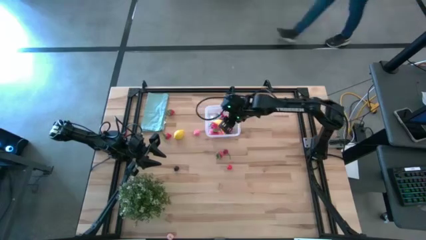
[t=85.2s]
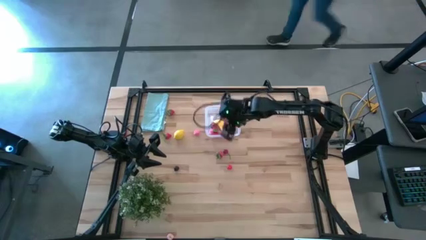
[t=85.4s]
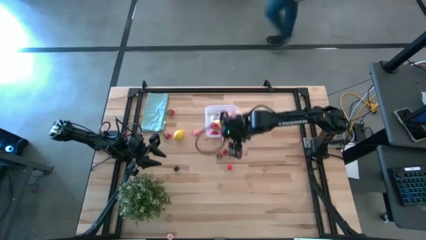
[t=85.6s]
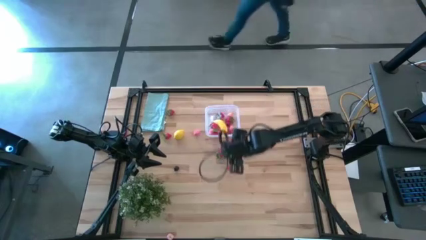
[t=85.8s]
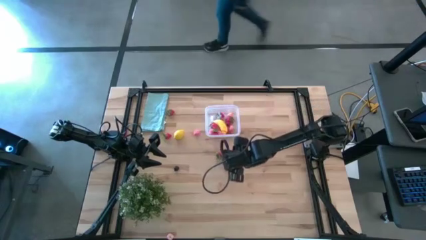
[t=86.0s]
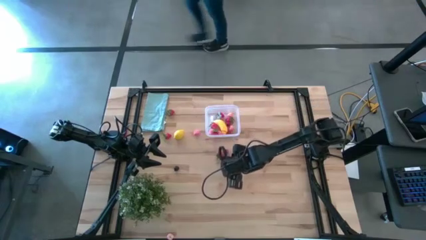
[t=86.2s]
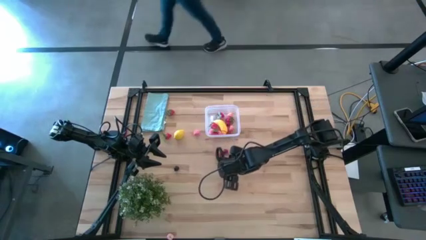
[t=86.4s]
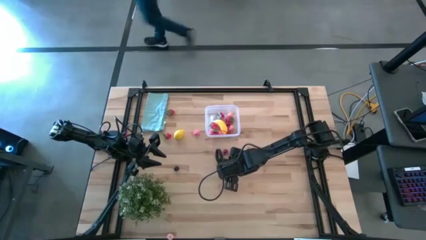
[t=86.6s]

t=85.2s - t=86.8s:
Task: Pick and placing Produce into tupperware
Put the red cherry into the transparent bin

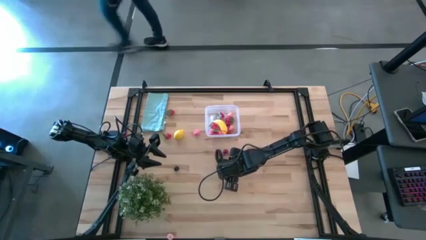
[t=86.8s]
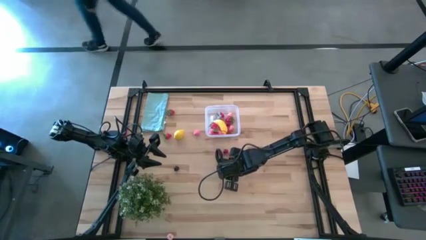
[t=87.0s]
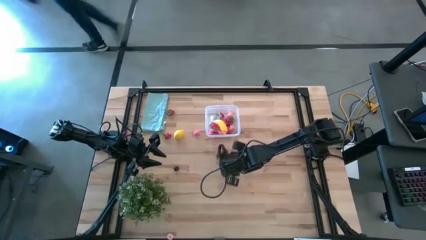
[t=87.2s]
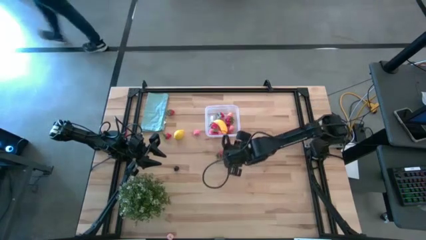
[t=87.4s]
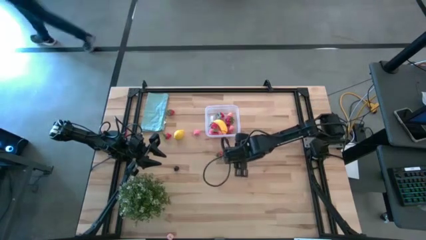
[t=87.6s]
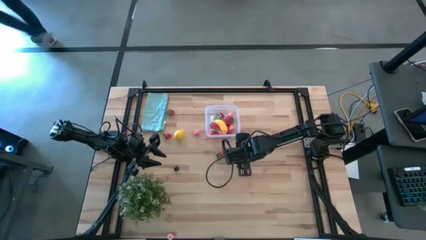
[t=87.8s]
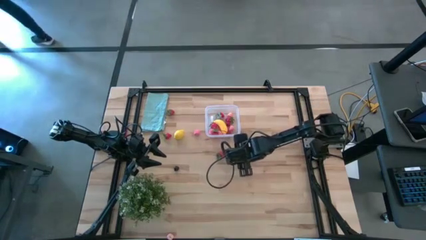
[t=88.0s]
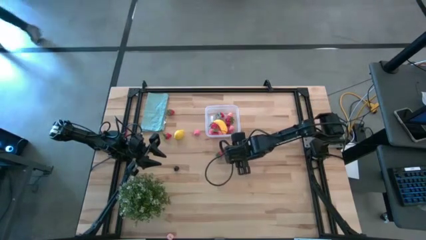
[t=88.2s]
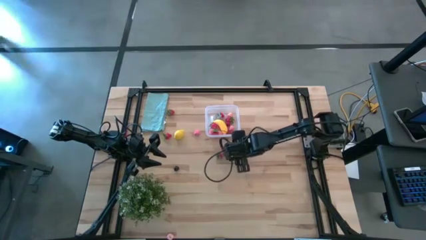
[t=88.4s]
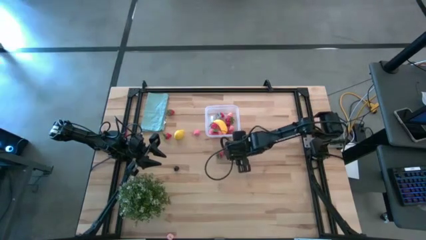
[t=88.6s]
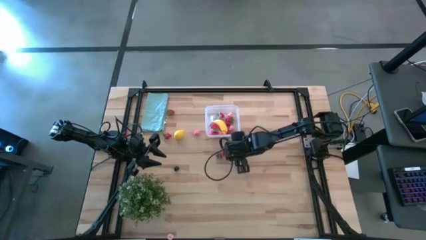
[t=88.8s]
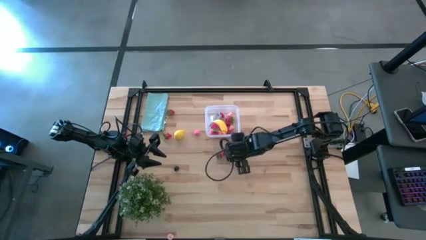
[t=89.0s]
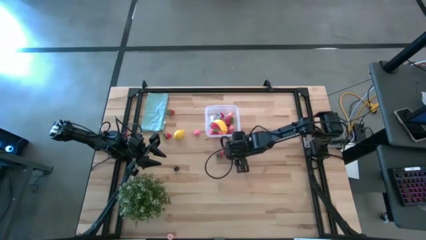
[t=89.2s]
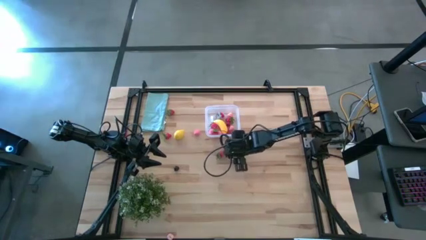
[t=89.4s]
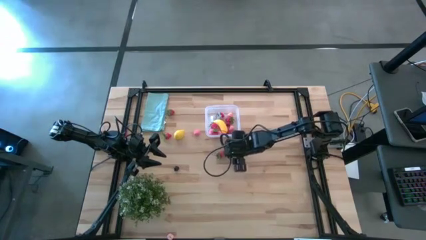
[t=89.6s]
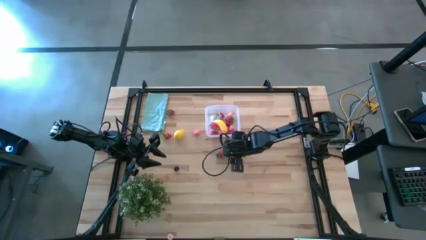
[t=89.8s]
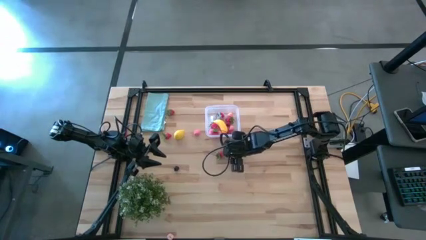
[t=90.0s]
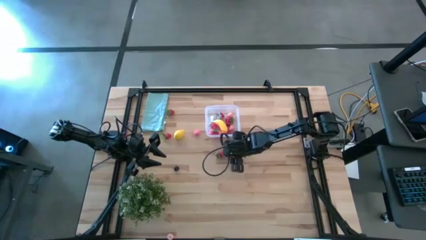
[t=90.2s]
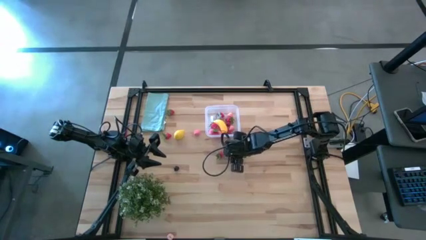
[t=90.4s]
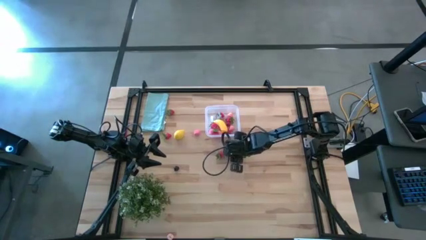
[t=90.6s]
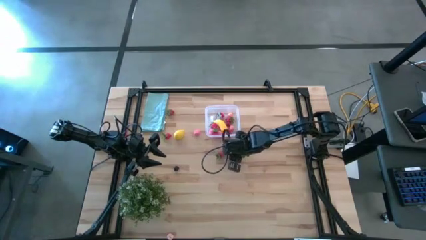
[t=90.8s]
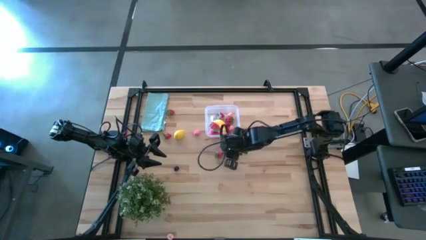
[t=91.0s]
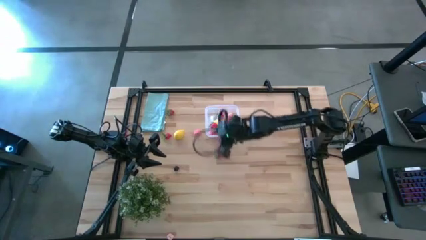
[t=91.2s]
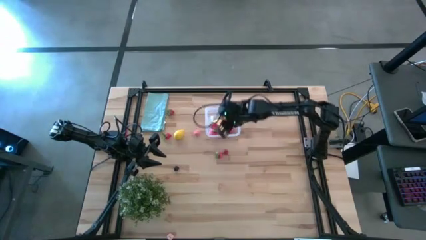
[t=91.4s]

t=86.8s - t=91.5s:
Put the red cherry into the transparent bin

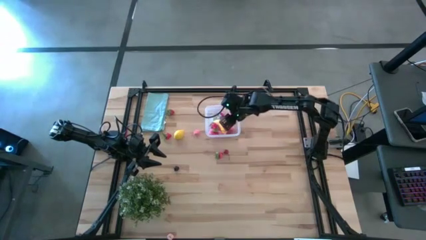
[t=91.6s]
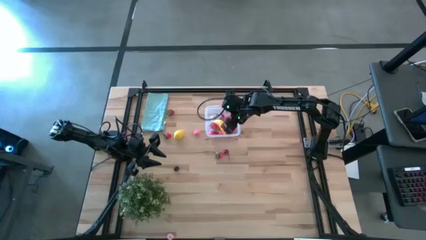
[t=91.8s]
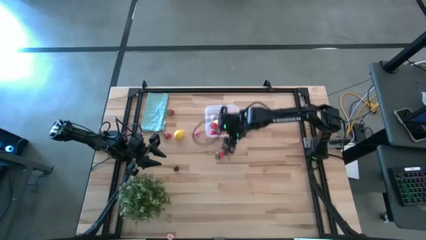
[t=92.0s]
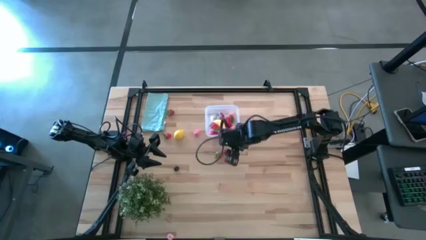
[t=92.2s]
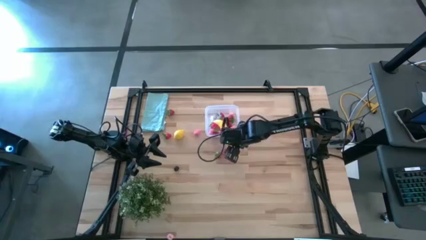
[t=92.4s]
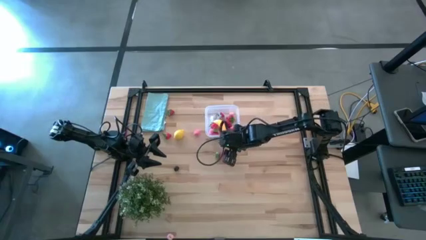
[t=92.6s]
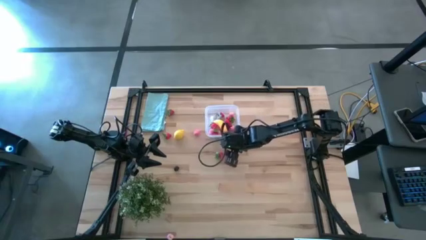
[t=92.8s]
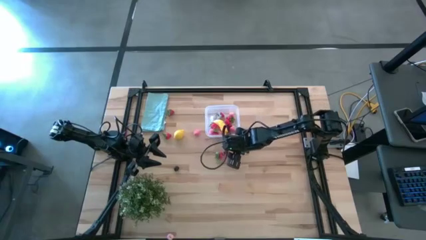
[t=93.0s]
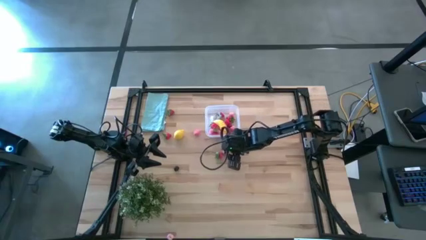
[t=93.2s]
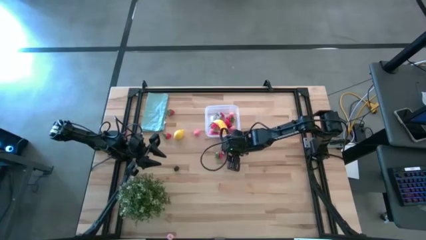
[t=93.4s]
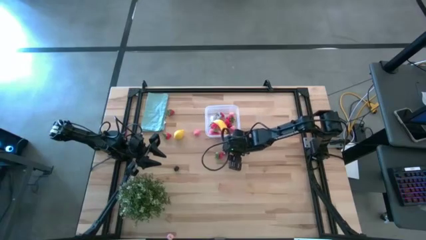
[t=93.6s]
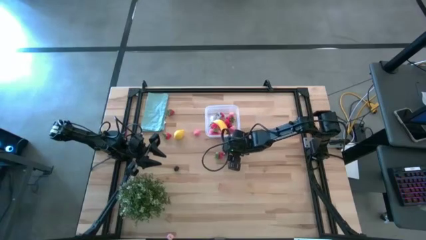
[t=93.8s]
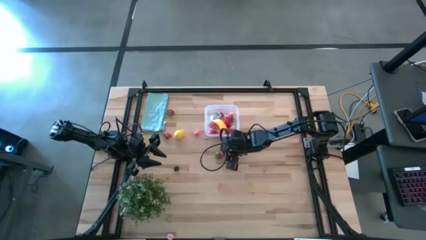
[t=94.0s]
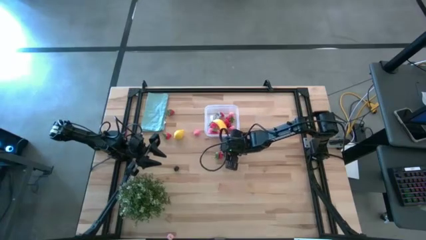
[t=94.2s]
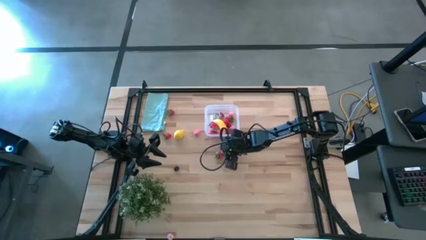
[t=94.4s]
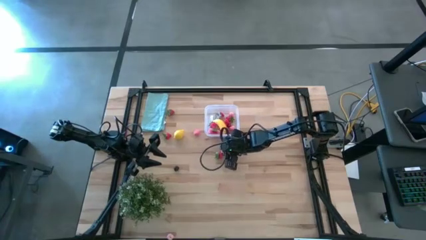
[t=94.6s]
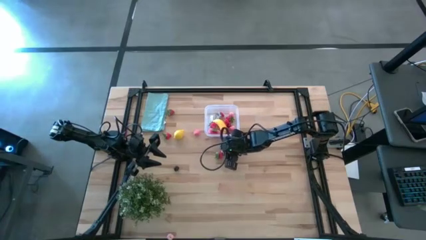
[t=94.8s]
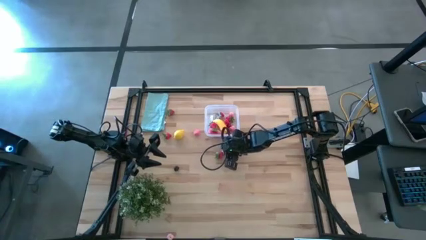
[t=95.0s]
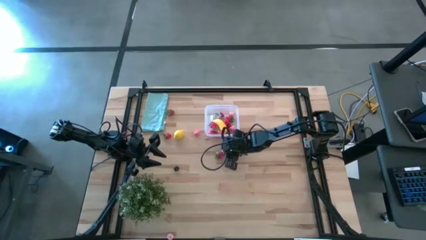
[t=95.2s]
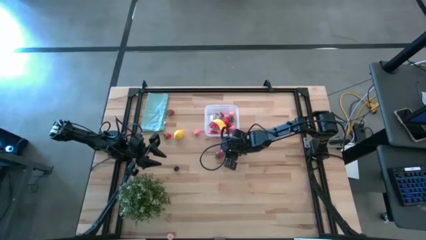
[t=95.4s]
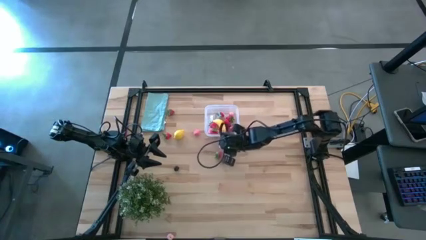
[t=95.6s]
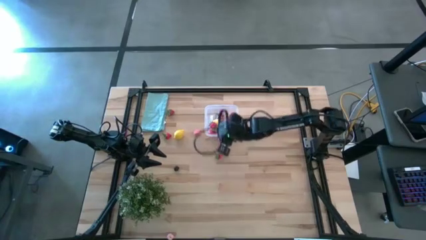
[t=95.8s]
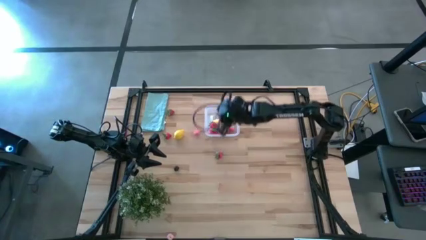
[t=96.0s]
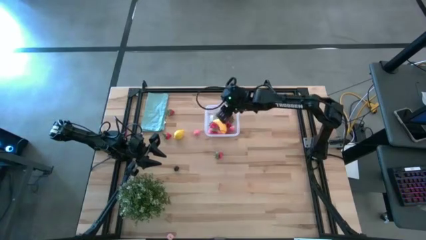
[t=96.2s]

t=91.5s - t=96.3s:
Put the red cherry into the transparent bin

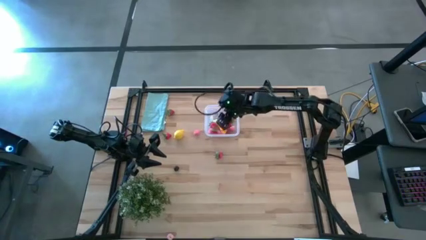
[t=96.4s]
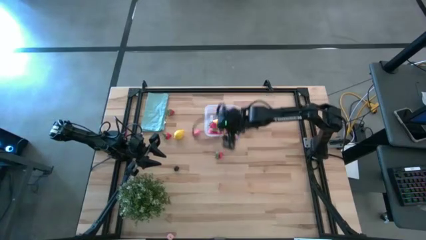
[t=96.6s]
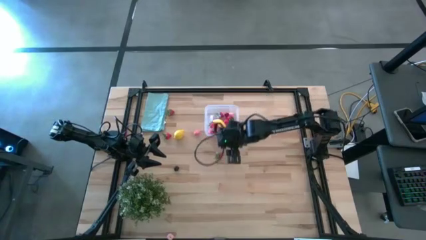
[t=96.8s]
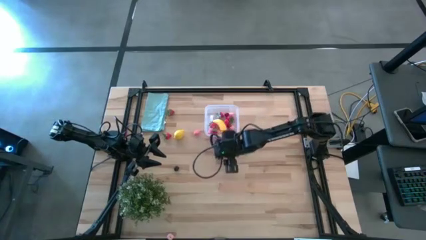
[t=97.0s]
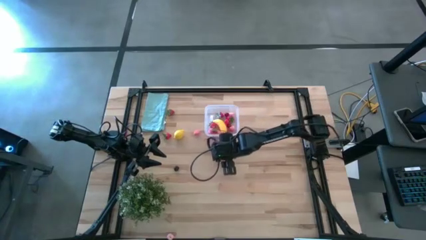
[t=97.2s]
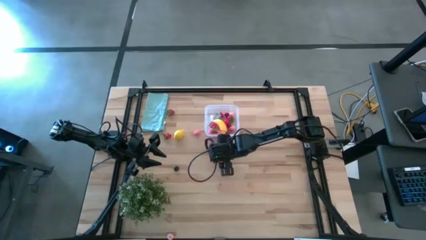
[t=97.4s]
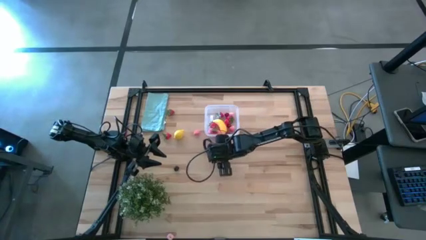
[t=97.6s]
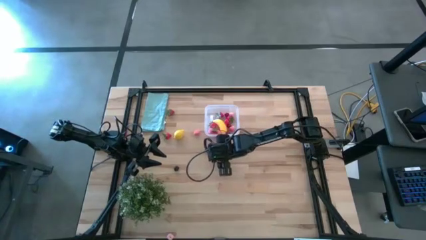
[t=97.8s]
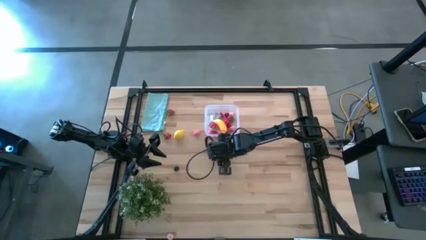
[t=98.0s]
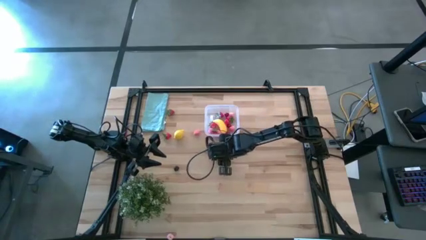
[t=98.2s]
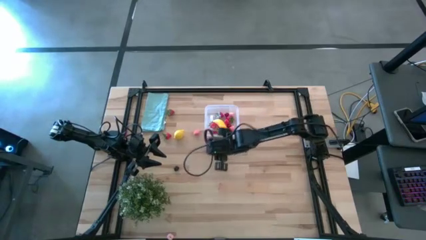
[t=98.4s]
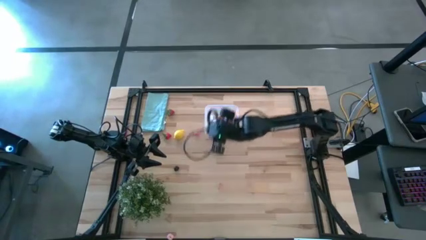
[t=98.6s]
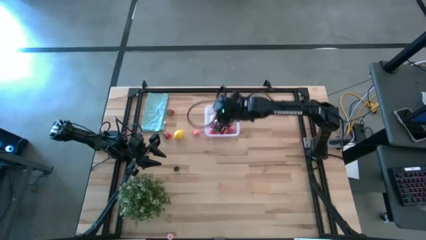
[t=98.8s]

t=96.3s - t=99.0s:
Put the red strawberry into the transparent bin

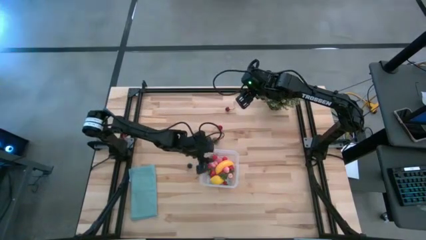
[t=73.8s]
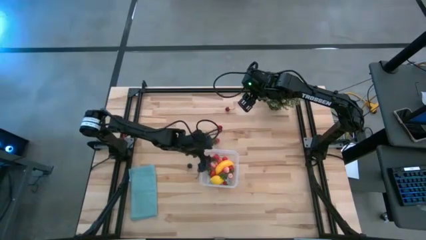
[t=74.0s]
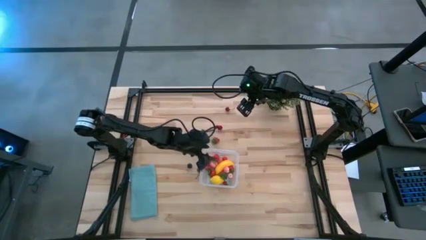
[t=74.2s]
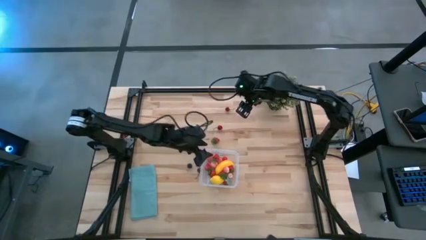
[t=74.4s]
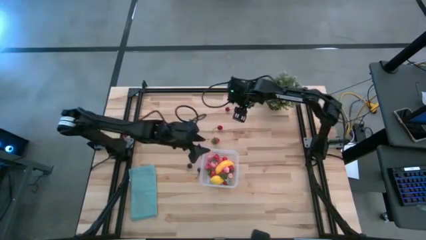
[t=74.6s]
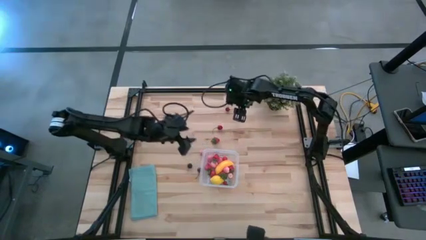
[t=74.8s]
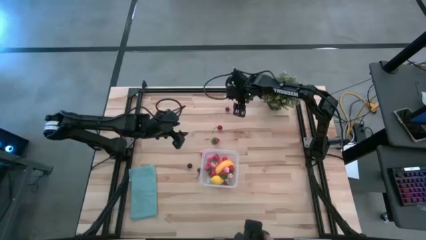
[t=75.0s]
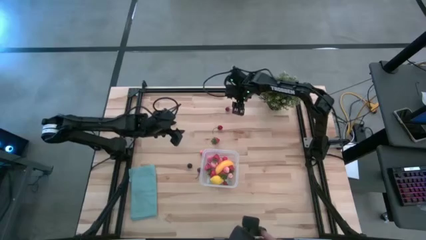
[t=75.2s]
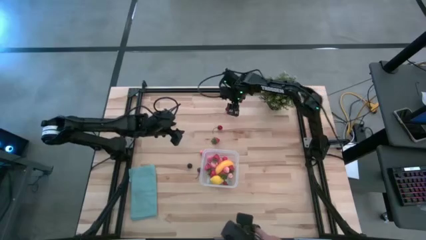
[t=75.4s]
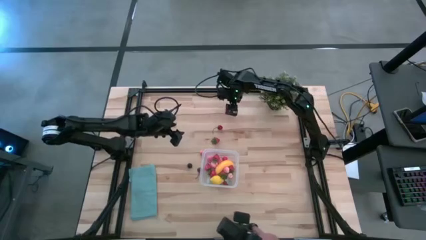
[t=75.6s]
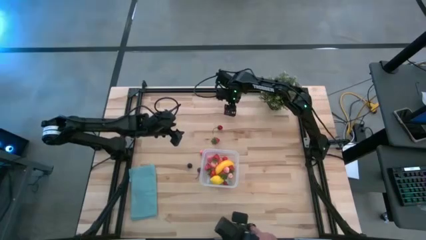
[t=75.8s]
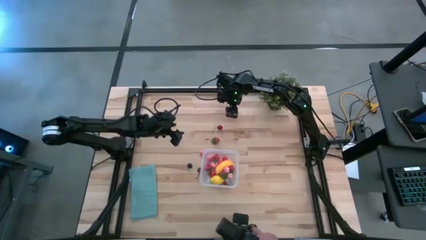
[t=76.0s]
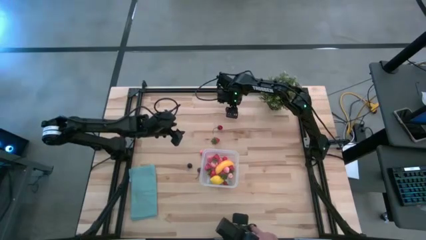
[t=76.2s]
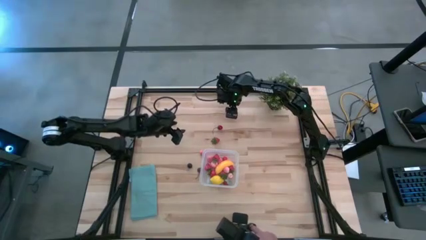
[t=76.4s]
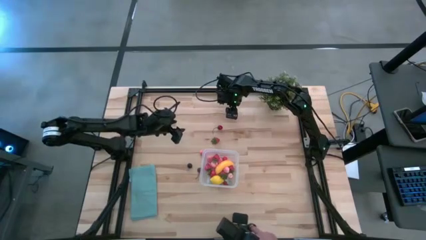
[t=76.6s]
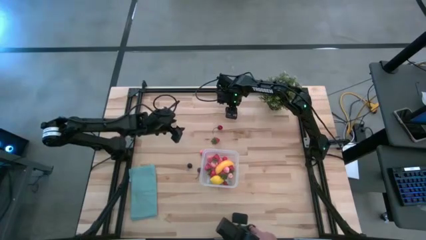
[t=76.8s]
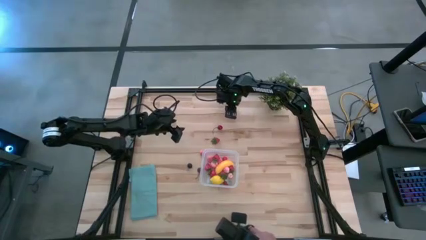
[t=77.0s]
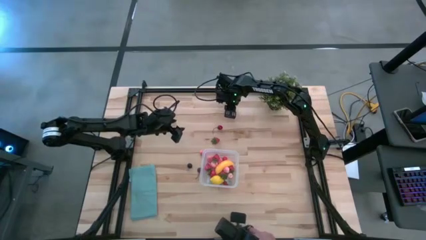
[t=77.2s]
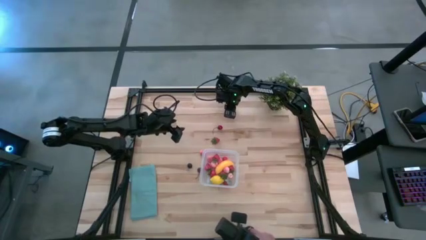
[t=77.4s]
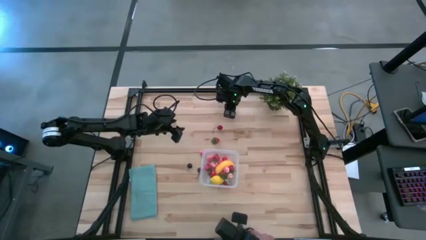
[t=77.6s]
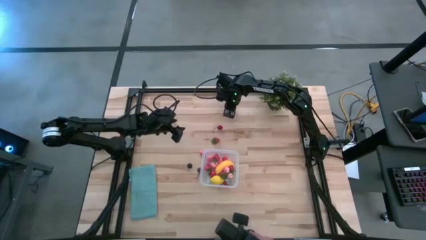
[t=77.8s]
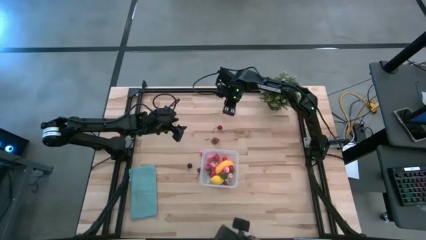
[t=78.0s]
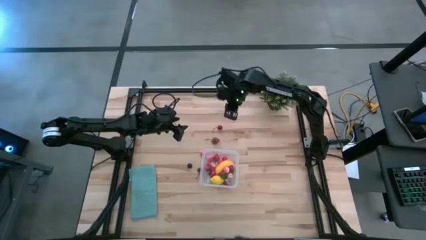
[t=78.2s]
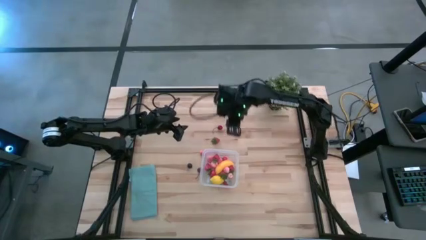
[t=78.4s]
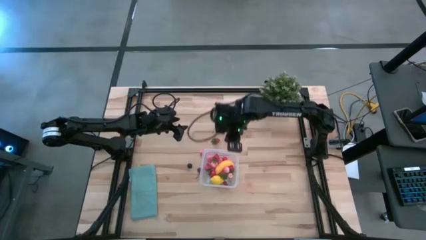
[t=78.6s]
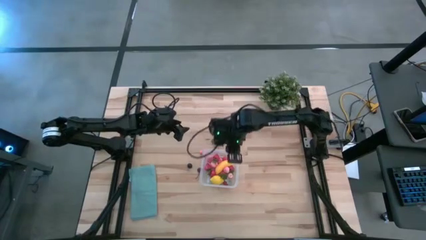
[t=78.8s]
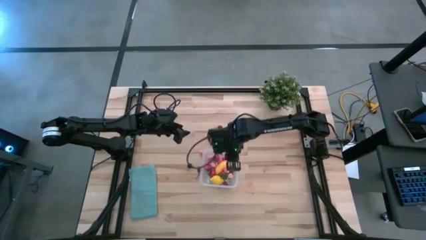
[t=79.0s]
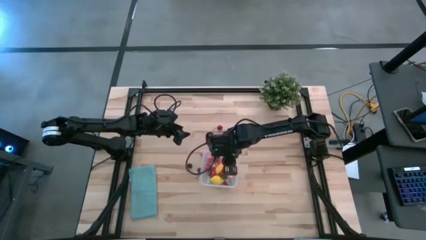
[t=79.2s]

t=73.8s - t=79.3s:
Task: Pick and placing Produce into tupperware
Put the black and red cherry into the transparent container
